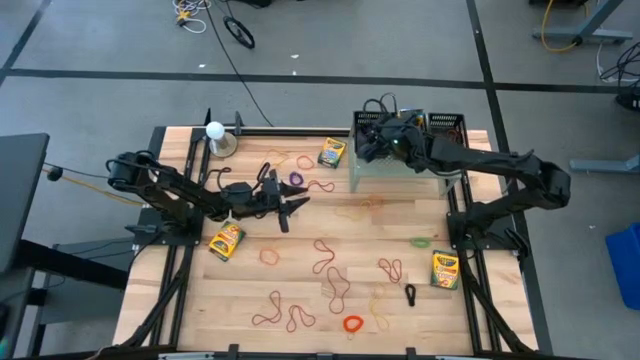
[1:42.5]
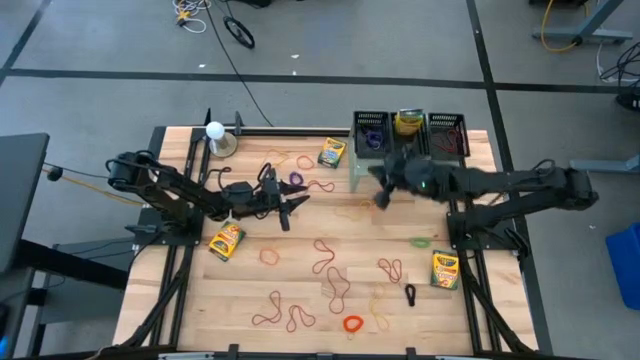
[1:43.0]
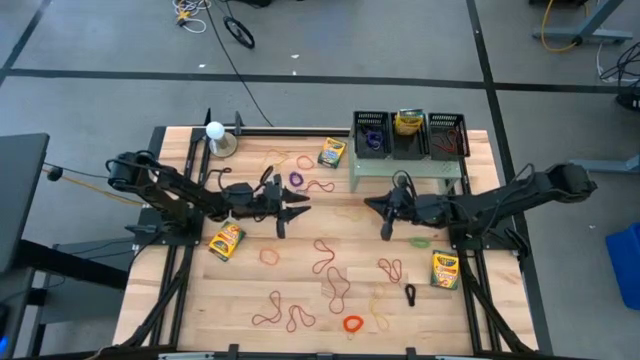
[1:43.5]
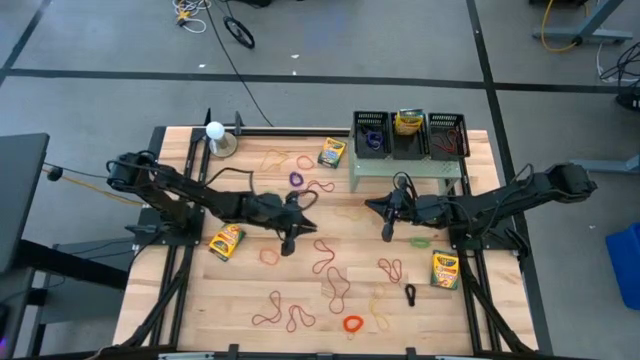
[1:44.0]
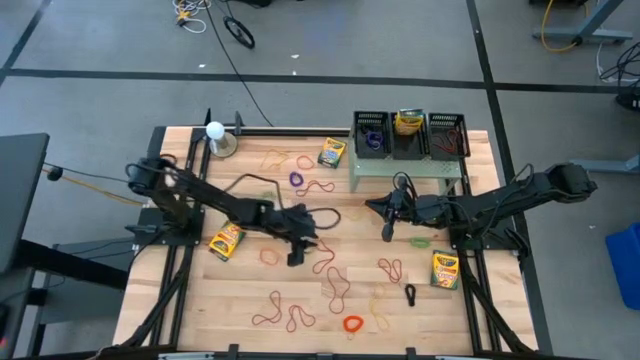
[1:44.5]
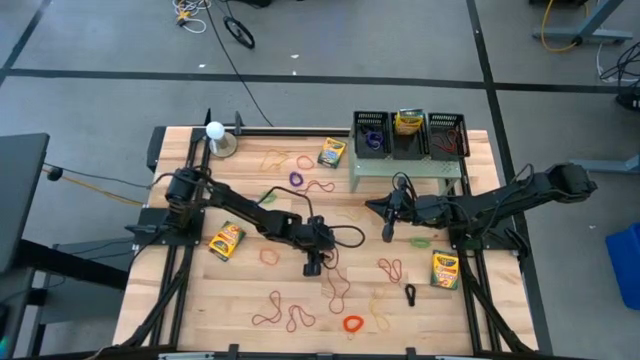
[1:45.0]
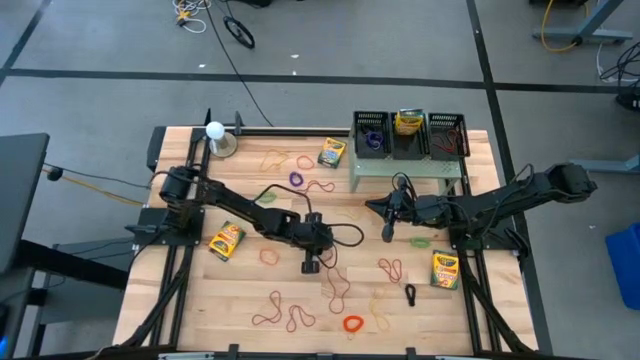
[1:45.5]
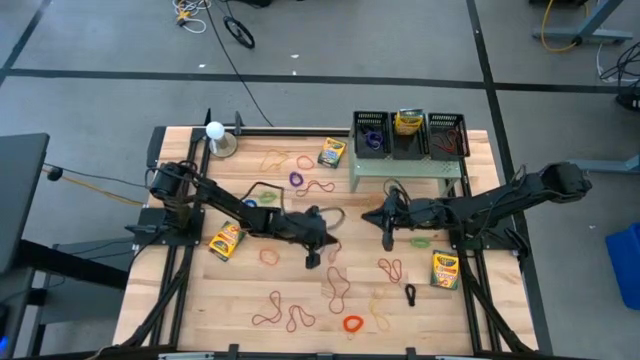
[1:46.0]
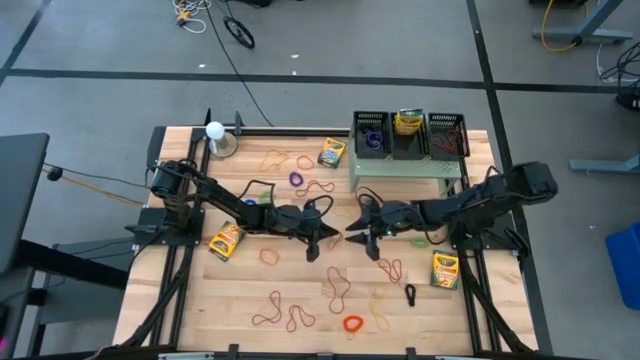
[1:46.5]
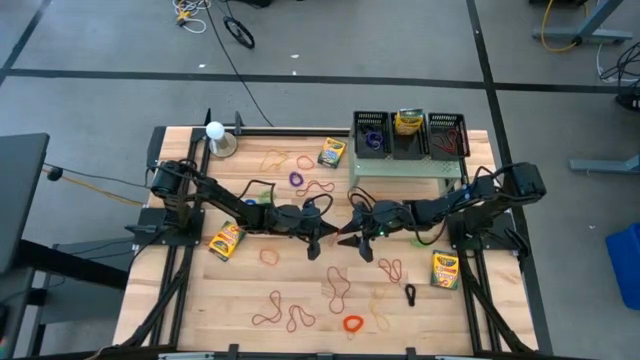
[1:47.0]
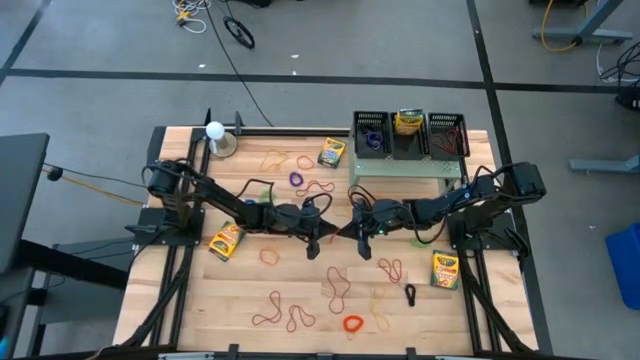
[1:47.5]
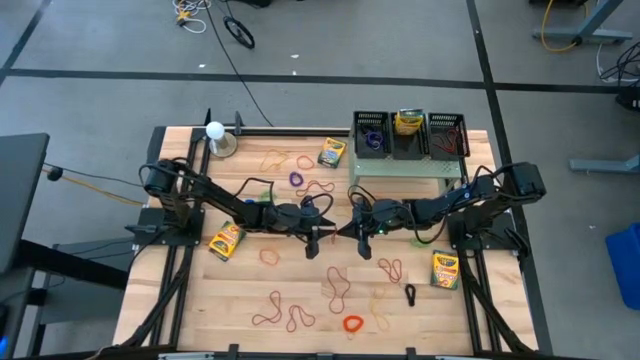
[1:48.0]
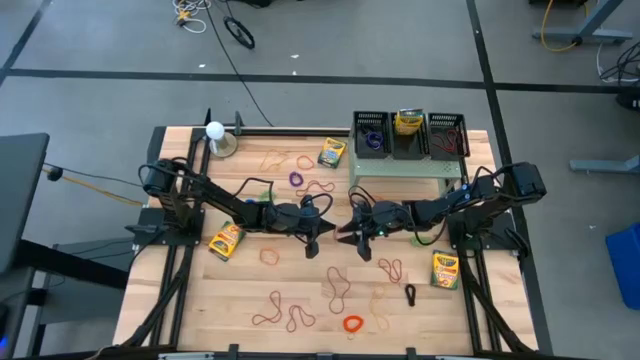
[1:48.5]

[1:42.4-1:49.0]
Task: Pick & Place Office Desk Supplies
Put the red rubber band into the right black basket on the shelf

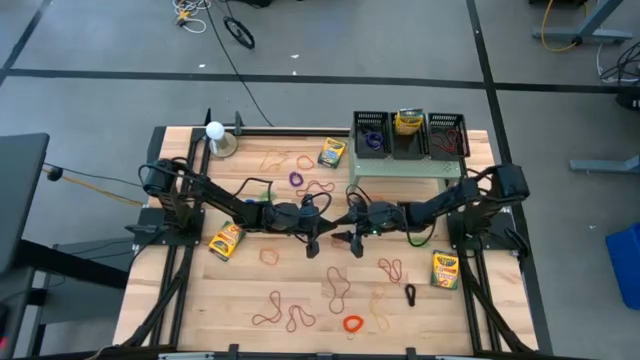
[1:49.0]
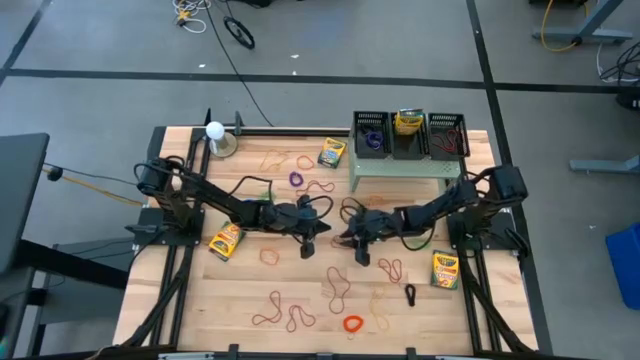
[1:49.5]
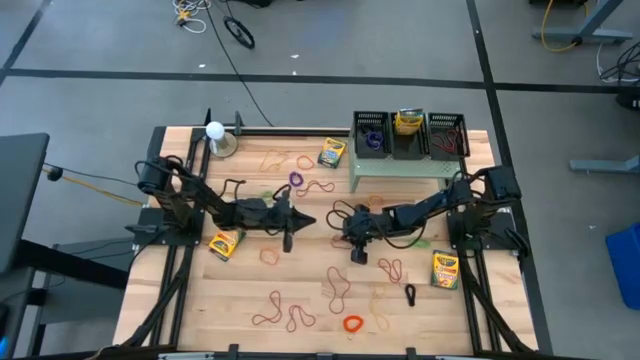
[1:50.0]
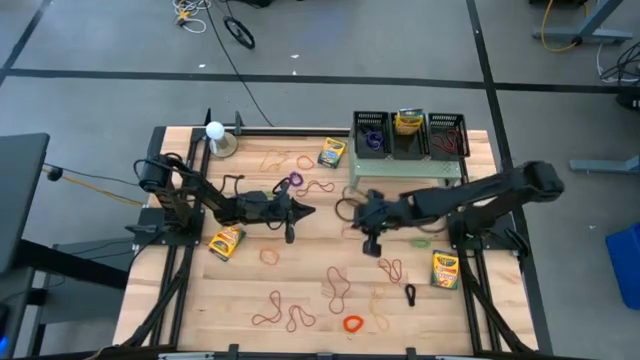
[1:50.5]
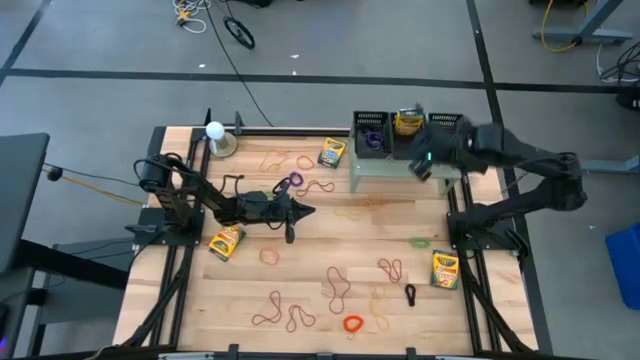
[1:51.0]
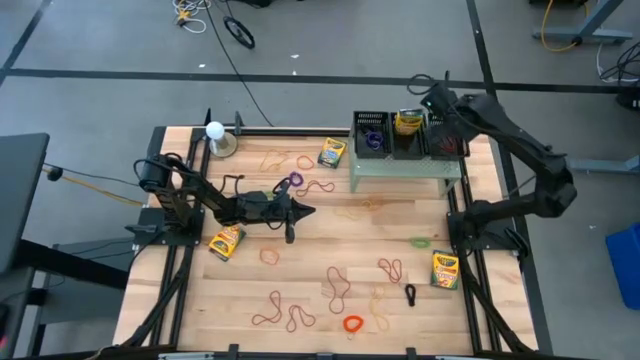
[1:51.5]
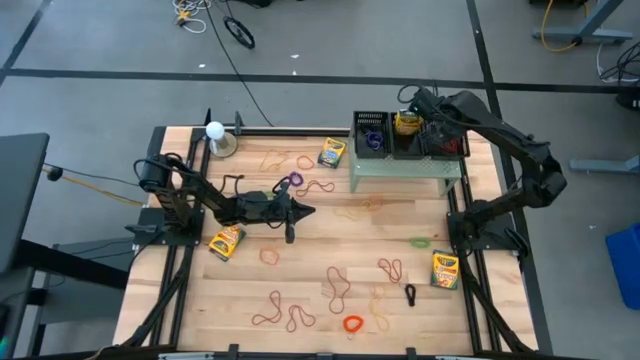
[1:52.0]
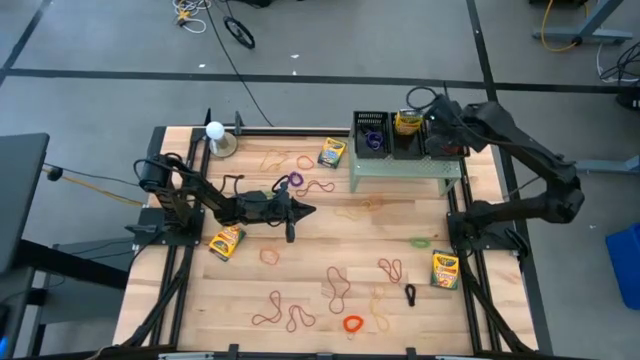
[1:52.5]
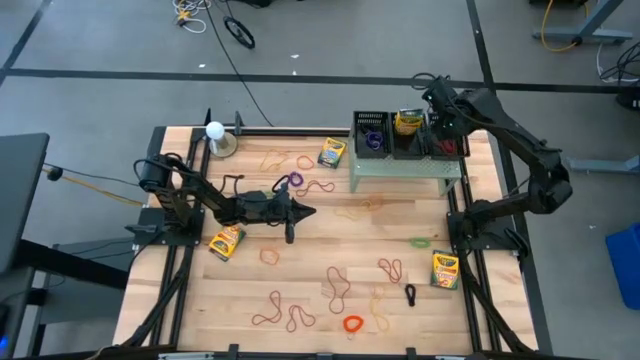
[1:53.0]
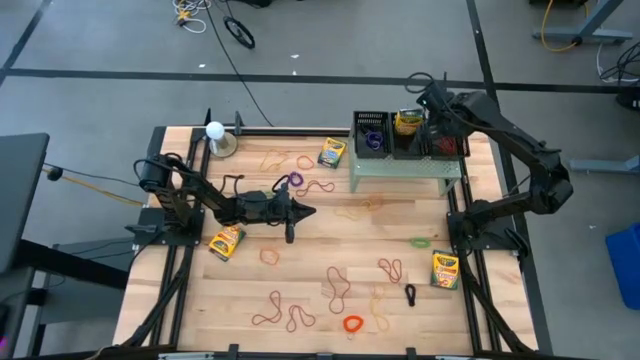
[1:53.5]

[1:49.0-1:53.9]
Put the red rubber band into the right black basket on the shelf

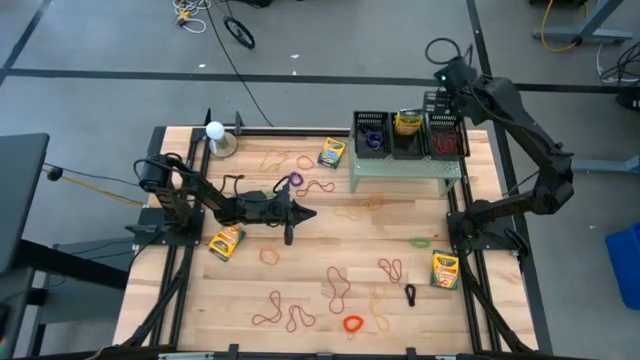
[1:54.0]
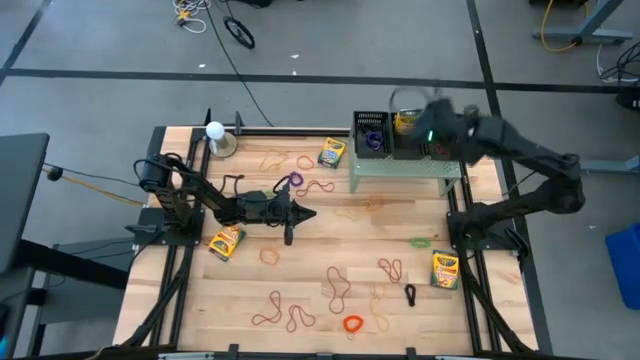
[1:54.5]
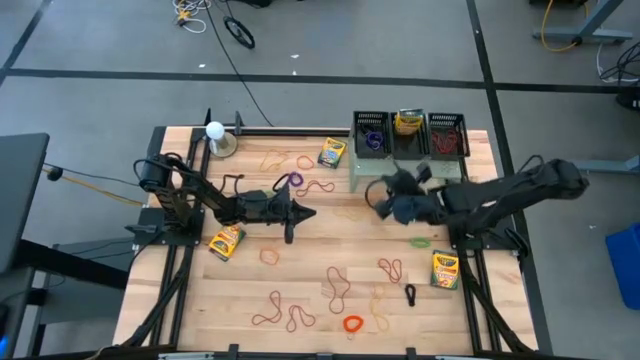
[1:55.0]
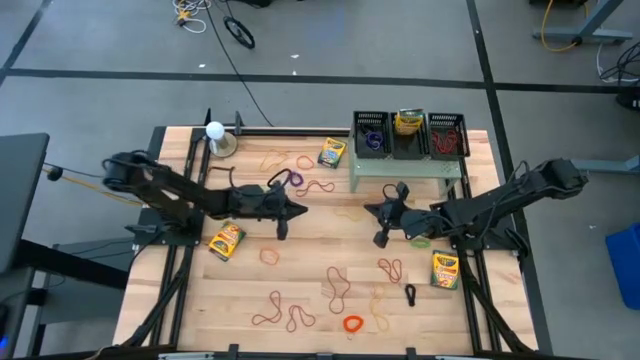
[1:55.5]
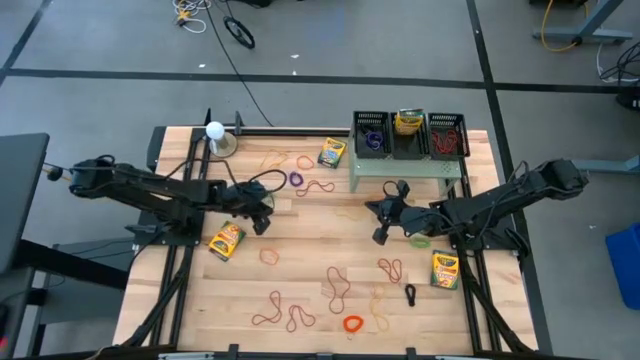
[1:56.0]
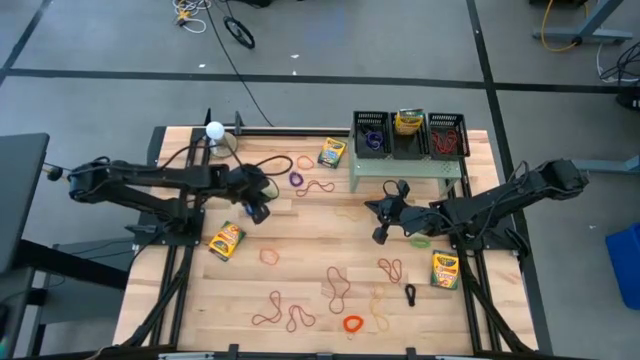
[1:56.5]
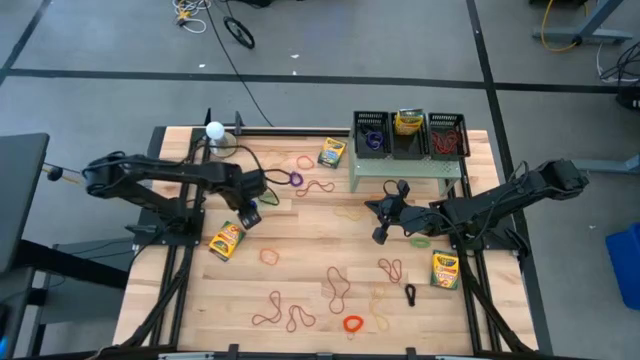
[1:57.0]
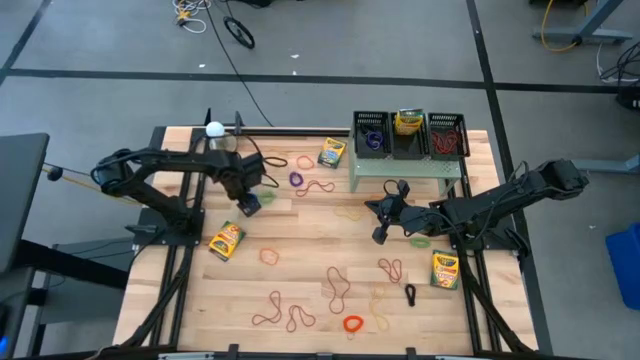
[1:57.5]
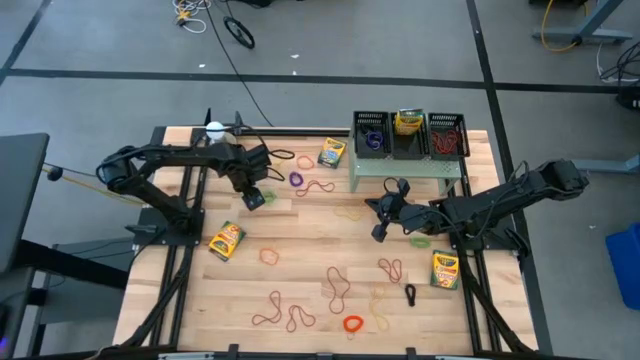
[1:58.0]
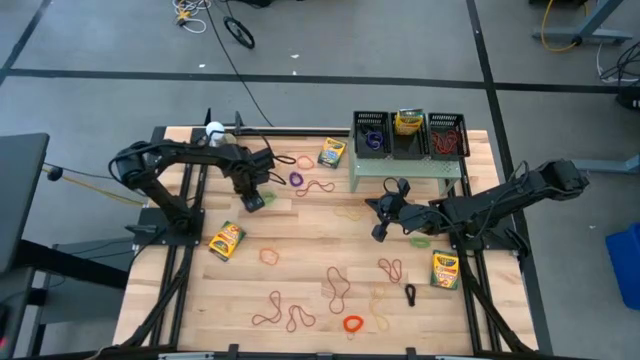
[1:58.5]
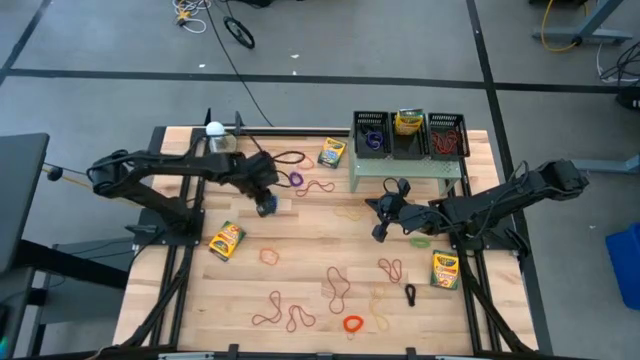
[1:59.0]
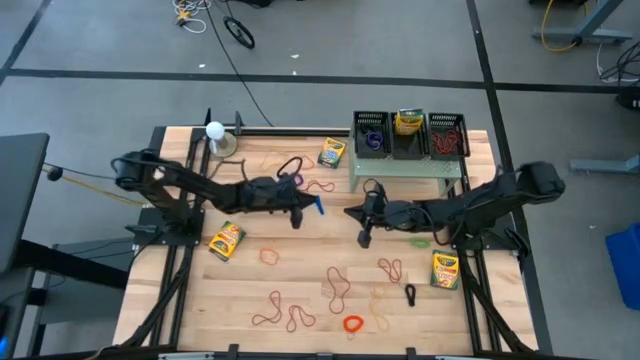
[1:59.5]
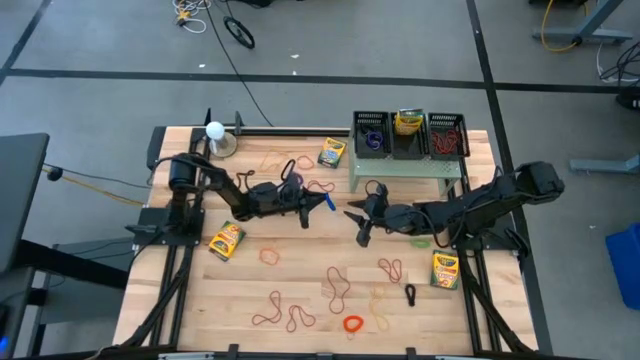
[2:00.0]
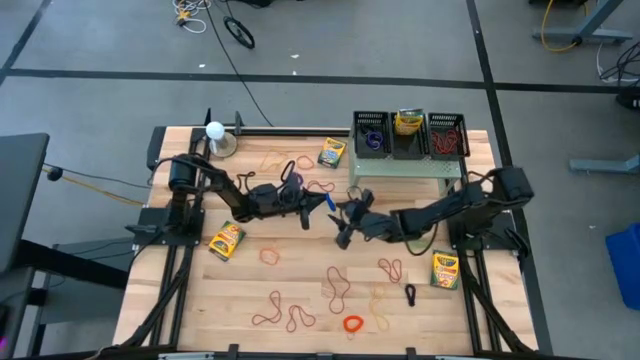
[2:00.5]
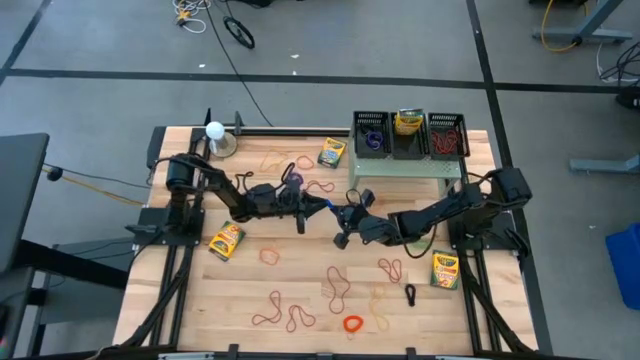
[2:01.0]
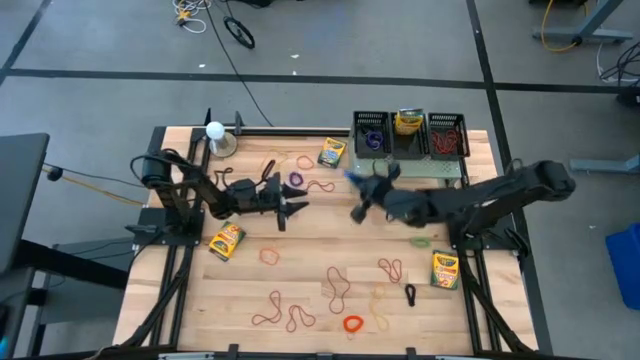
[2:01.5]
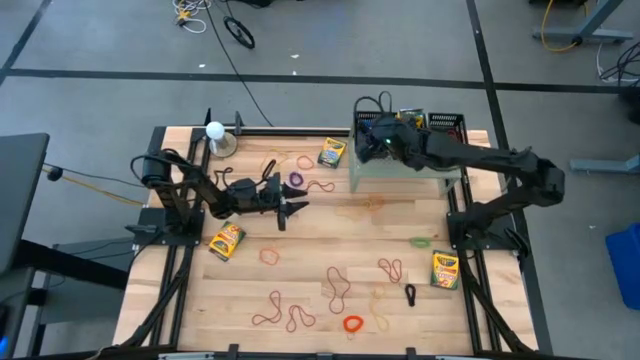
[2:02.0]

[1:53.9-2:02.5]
Put the blue spring keychain into the left black basket on the shelf

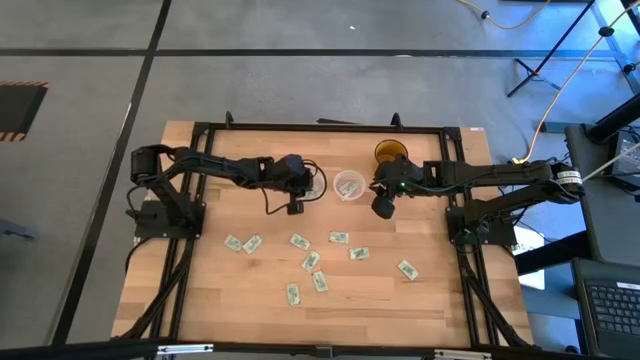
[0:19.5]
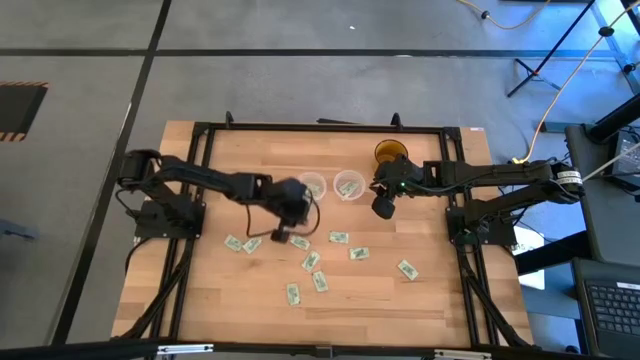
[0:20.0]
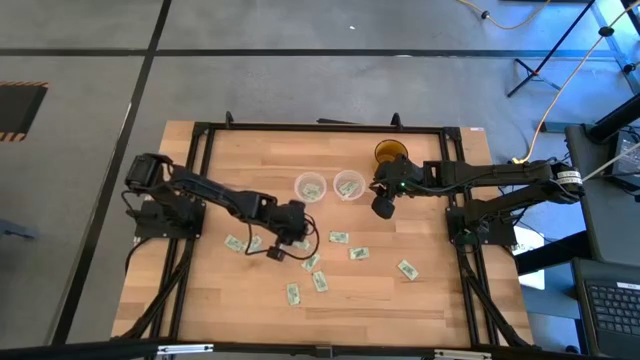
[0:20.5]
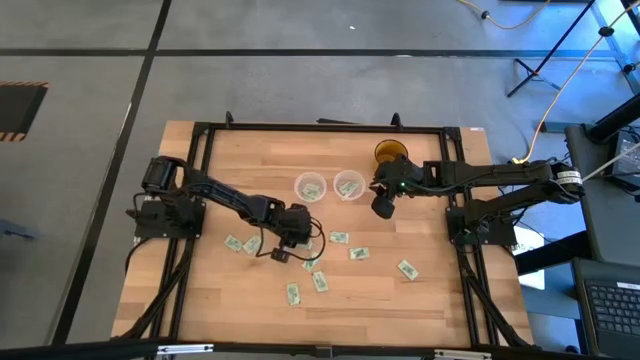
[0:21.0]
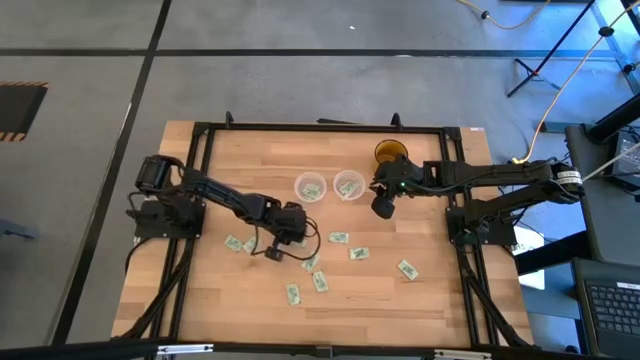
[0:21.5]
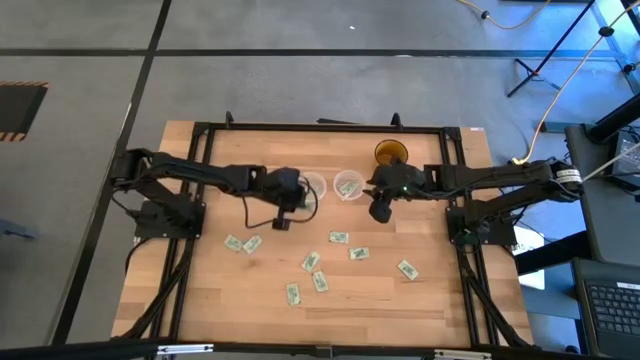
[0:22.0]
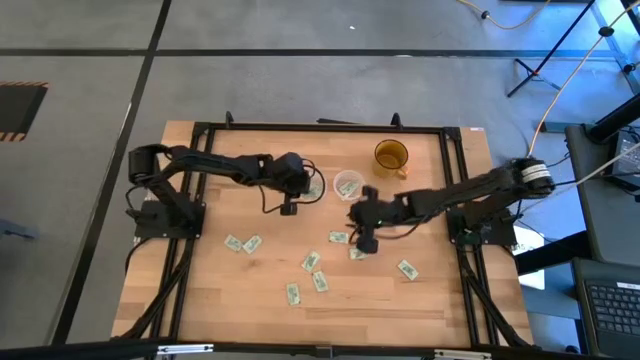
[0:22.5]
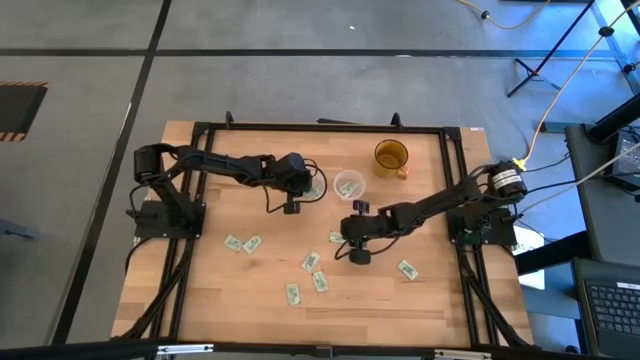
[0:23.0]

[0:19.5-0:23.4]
Task: Pick and place Stevia / Truvia into bins
Put the stevia packet into the left transparent container
